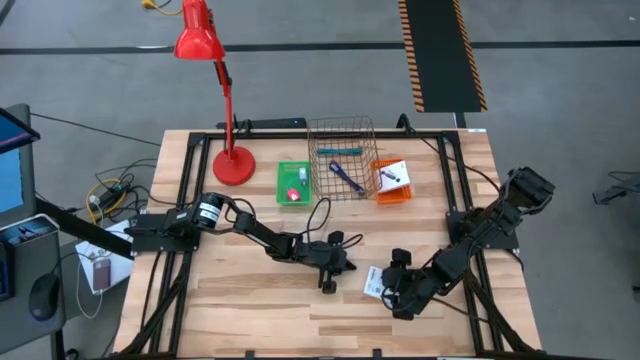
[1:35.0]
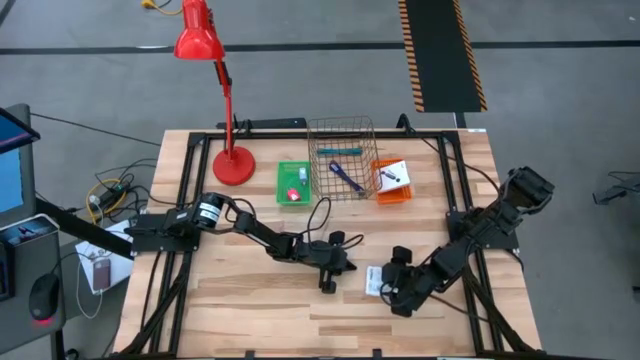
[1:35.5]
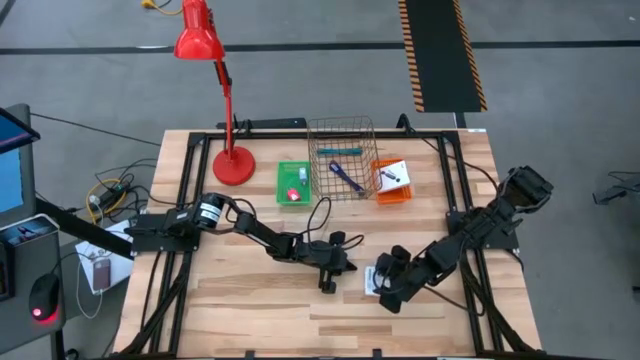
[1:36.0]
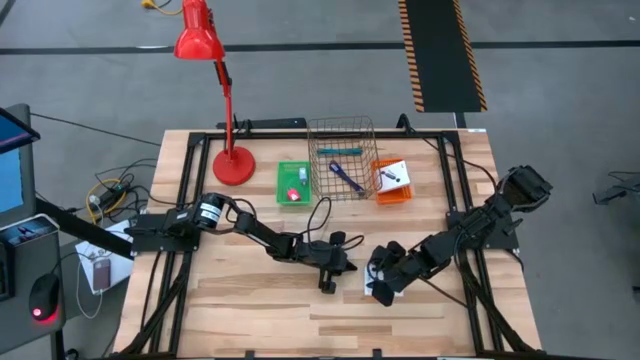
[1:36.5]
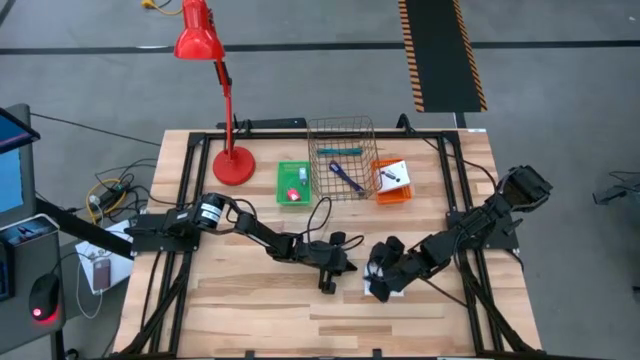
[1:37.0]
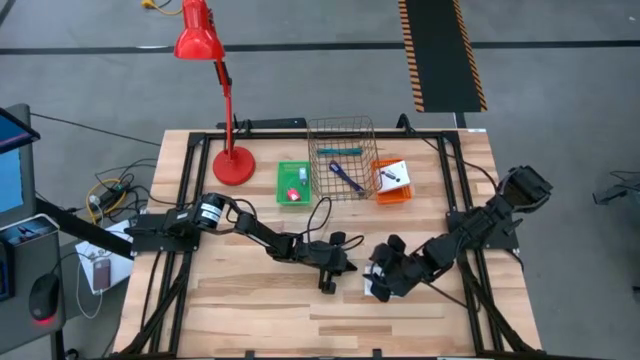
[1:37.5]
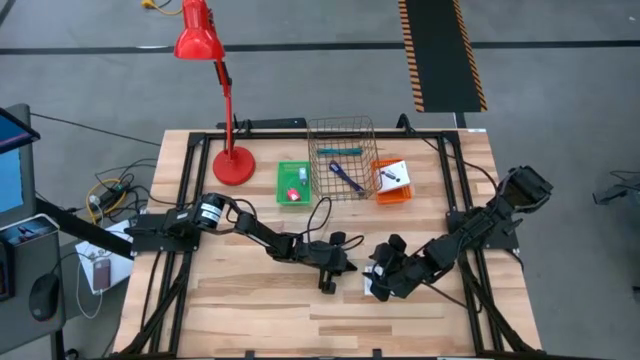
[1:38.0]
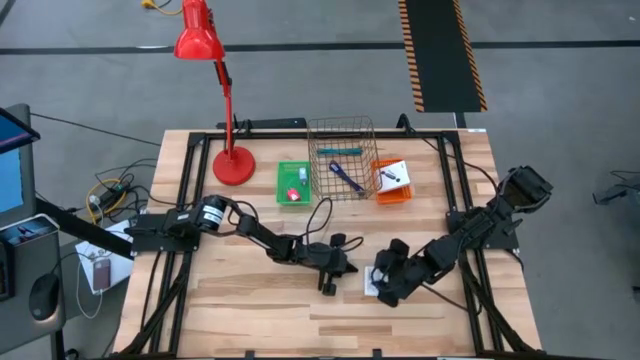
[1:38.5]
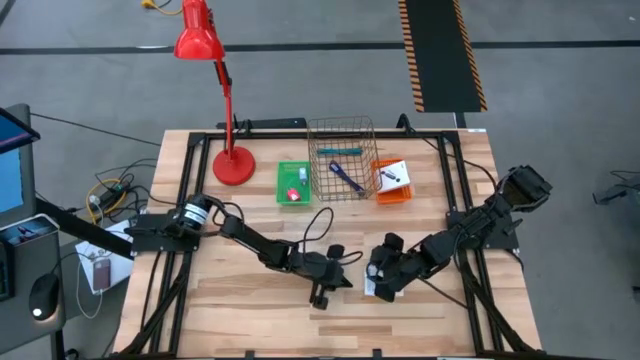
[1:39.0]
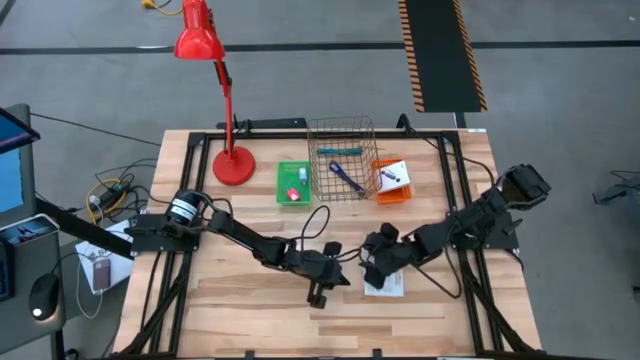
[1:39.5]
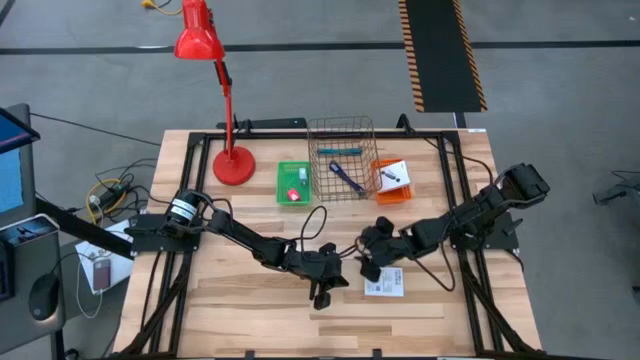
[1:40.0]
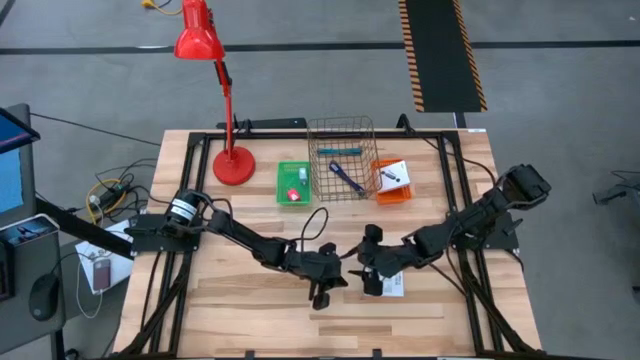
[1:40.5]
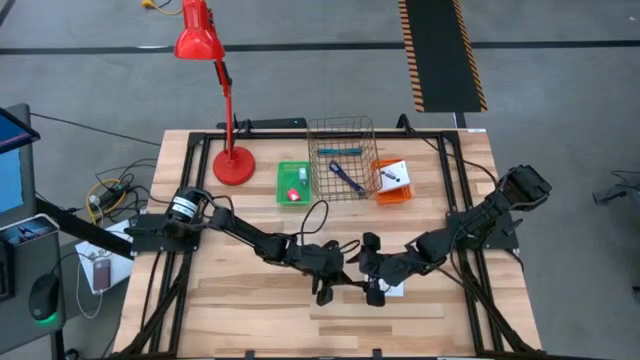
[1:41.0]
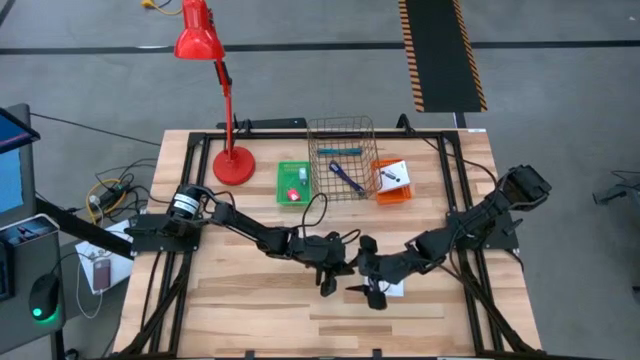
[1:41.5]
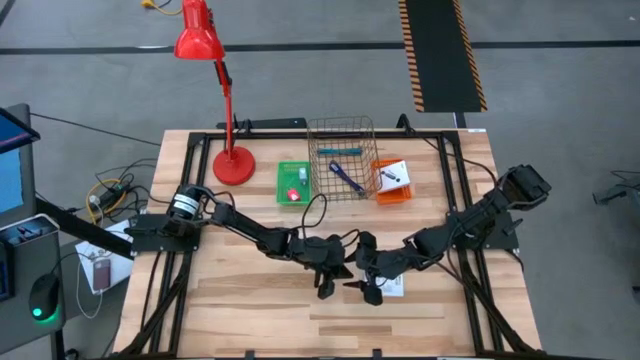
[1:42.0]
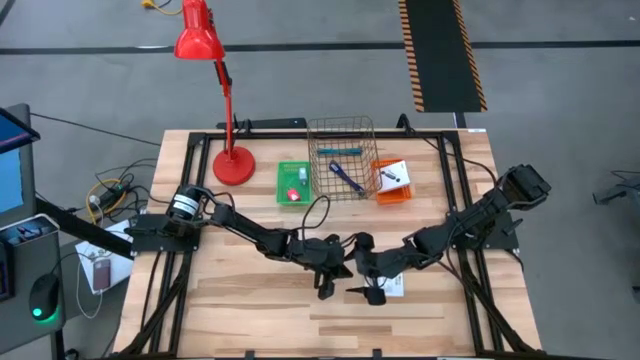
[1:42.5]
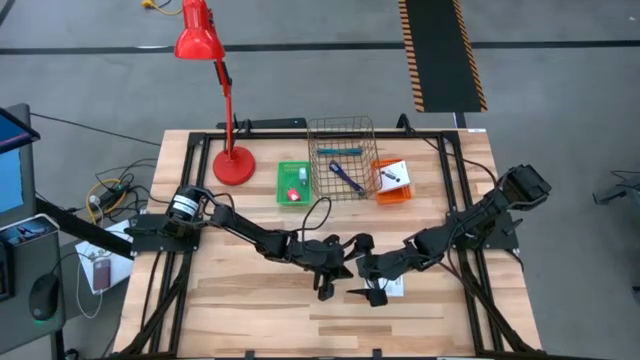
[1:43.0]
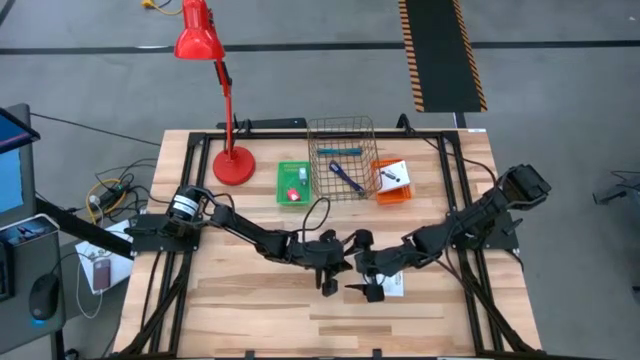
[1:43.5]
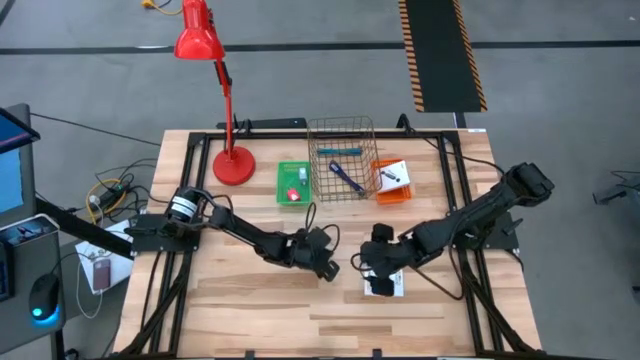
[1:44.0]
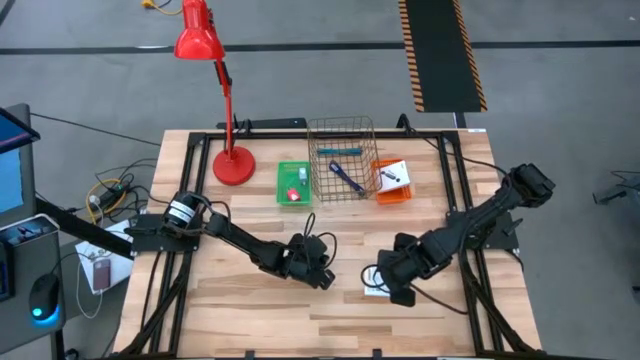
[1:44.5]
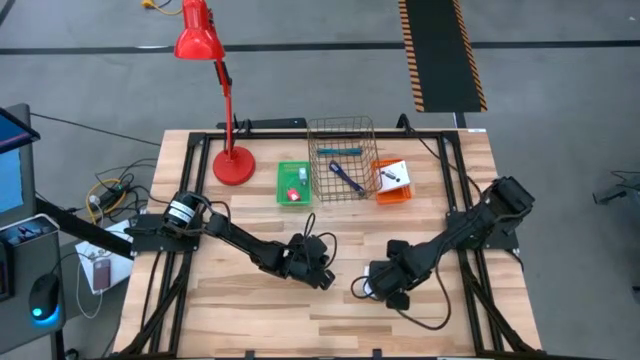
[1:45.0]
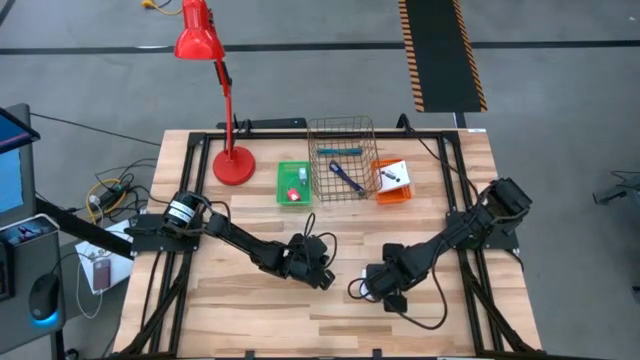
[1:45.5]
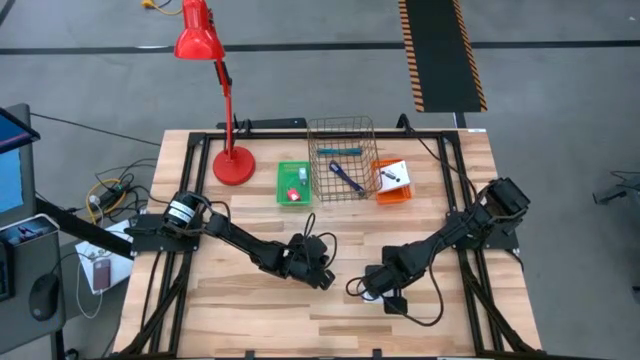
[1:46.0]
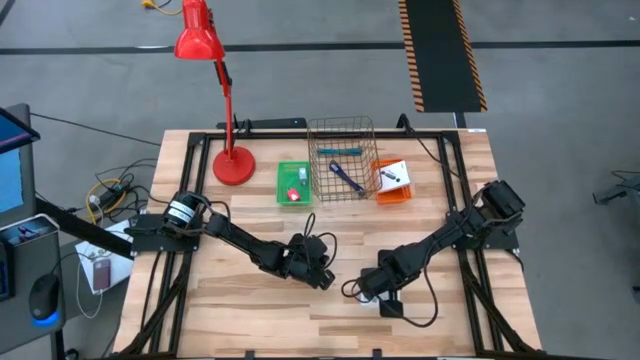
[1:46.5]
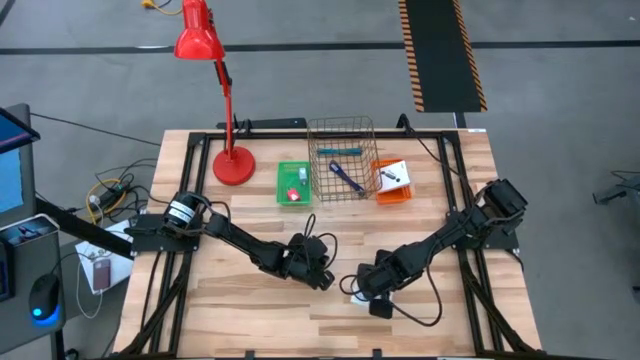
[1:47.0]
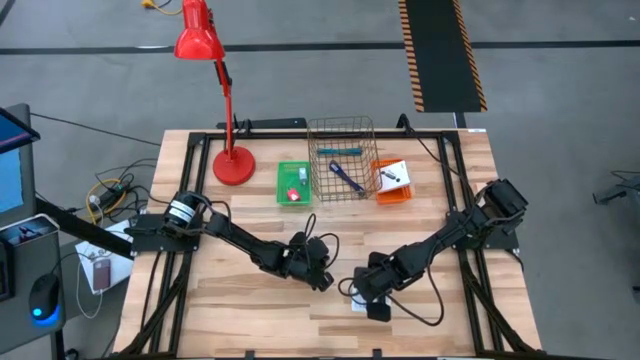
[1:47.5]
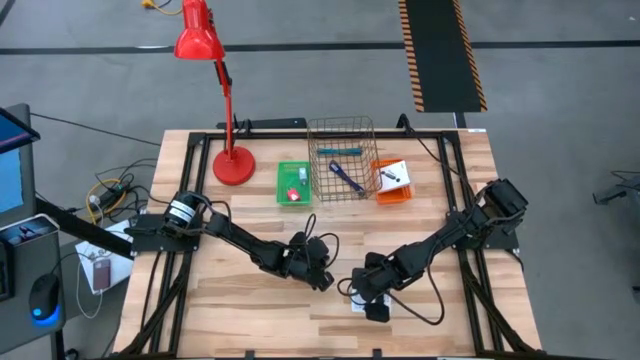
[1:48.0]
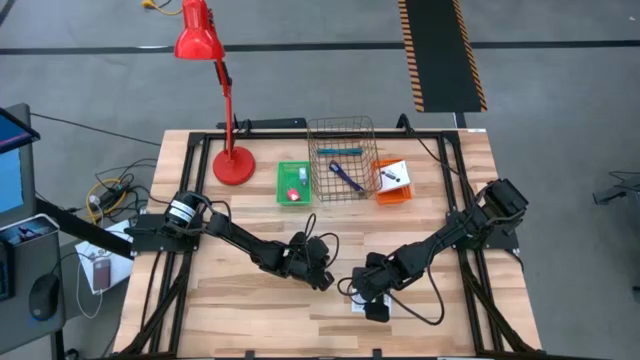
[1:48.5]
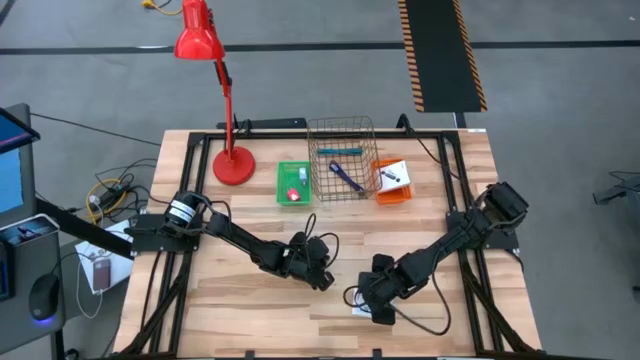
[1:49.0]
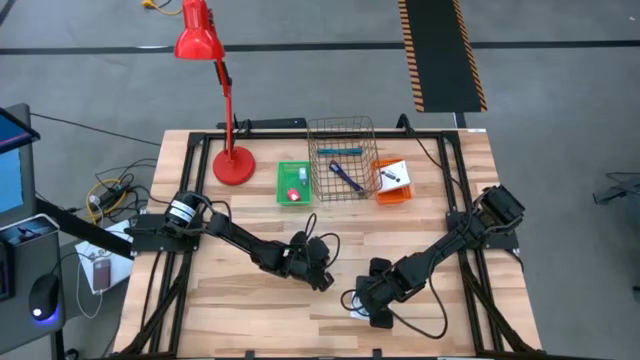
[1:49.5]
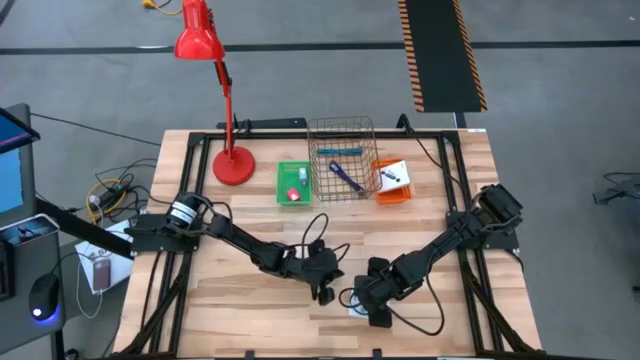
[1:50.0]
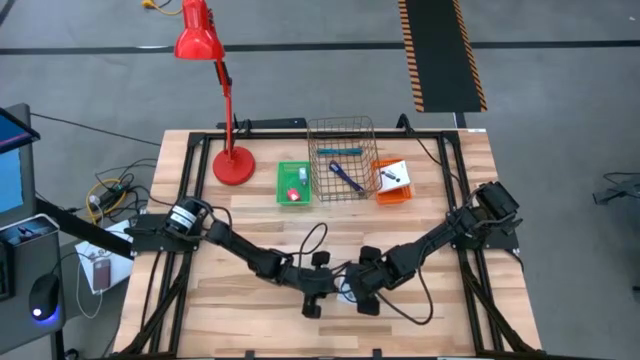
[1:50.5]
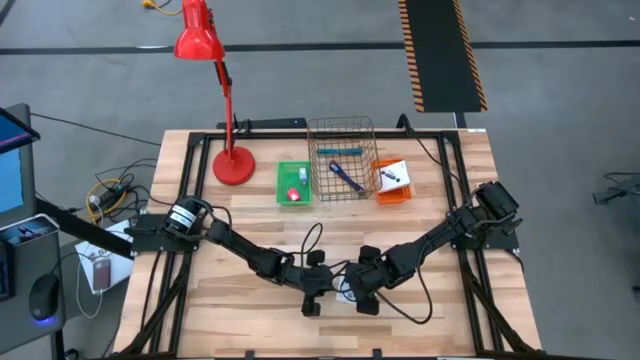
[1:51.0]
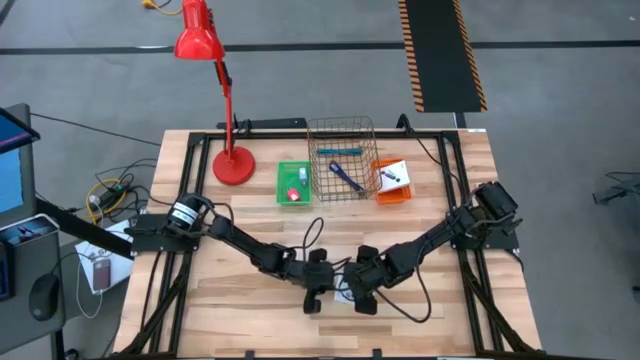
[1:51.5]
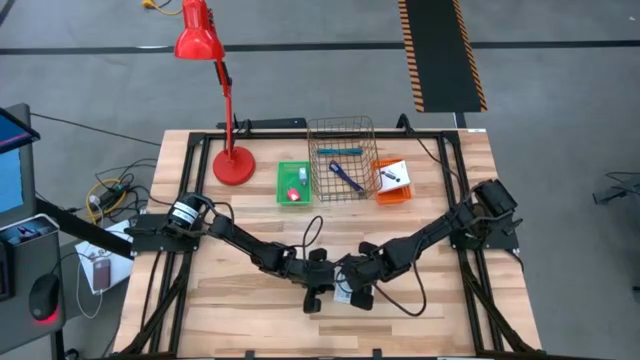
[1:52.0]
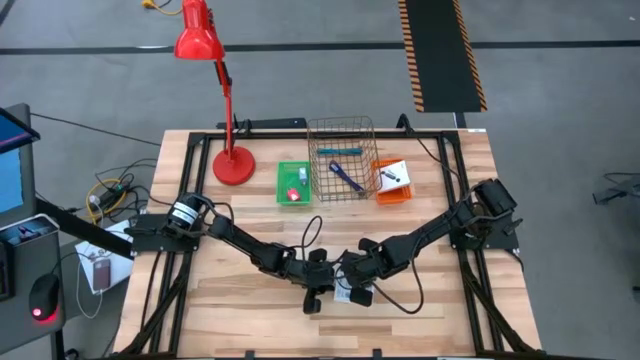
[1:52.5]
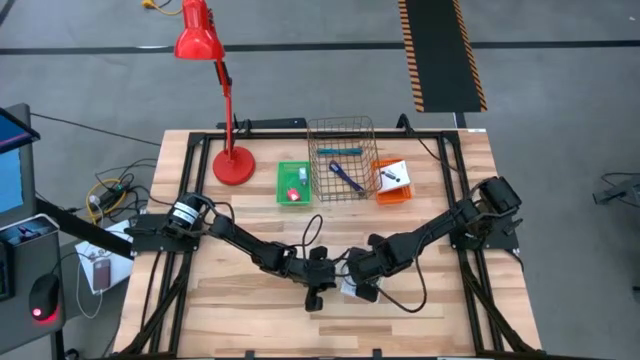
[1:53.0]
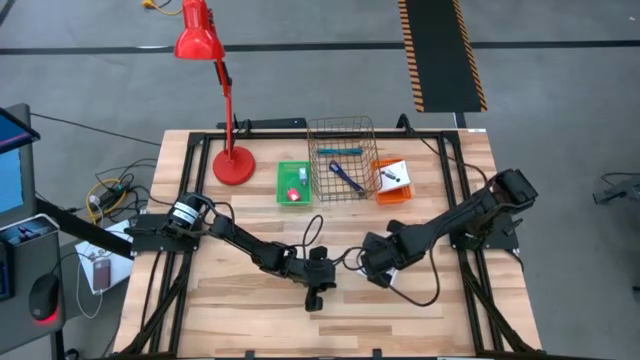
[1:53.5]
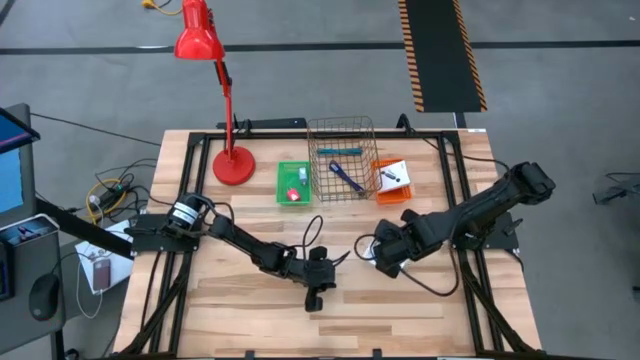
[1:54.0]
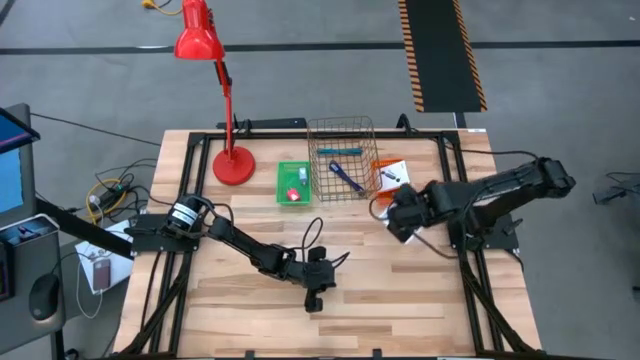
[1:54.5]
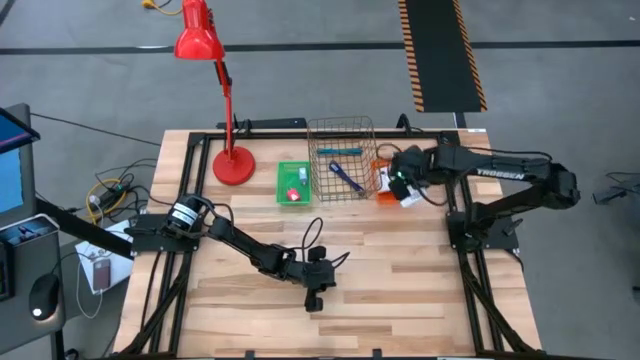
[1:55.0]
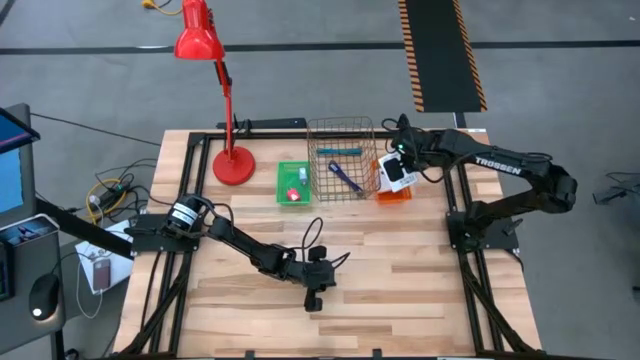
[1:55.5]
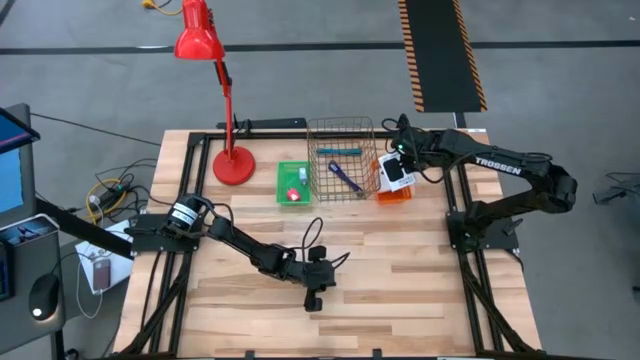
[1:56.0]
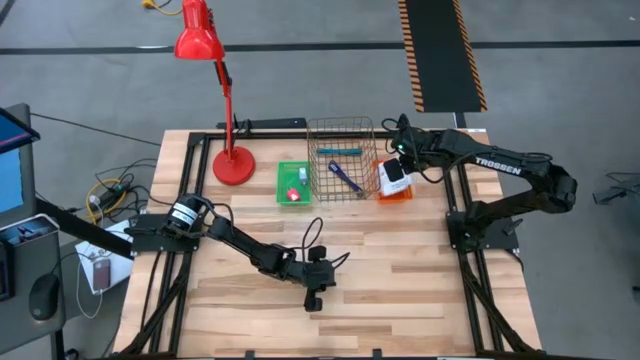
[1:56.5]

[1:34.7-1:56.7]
Task: Pick and place items into bin
Put the white box into the orange bin
